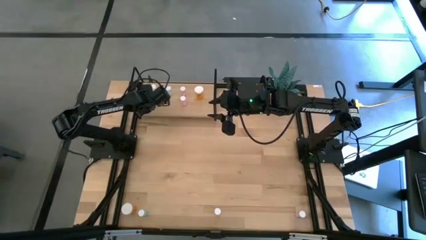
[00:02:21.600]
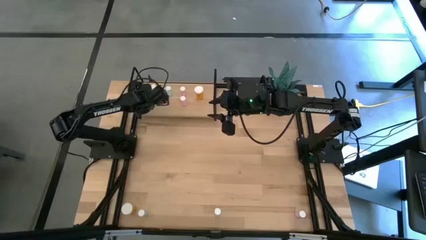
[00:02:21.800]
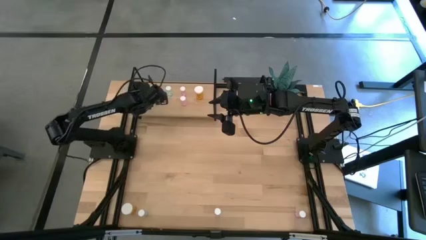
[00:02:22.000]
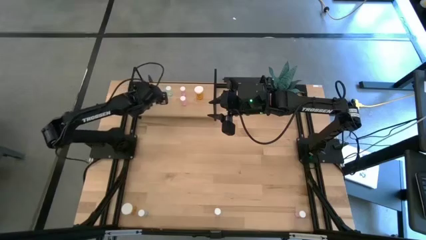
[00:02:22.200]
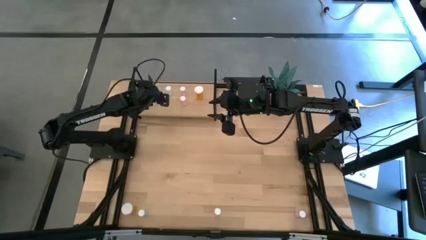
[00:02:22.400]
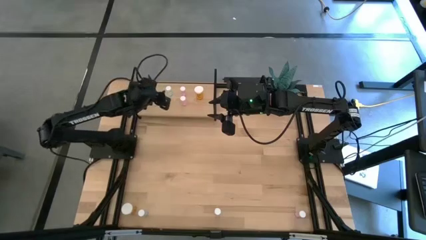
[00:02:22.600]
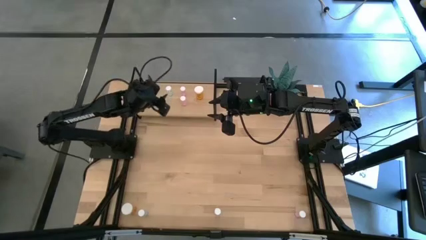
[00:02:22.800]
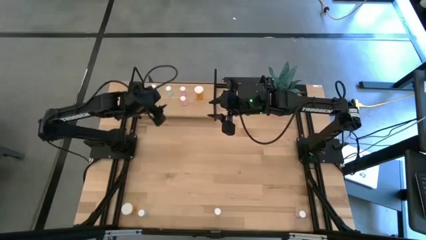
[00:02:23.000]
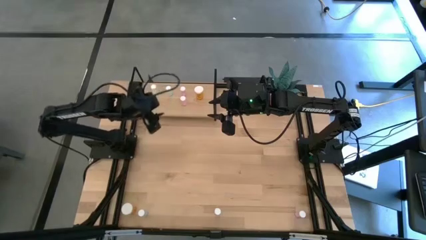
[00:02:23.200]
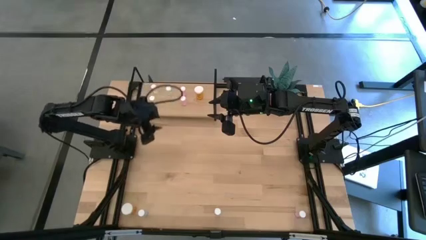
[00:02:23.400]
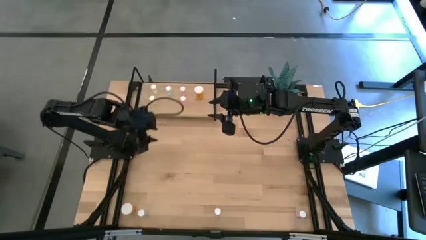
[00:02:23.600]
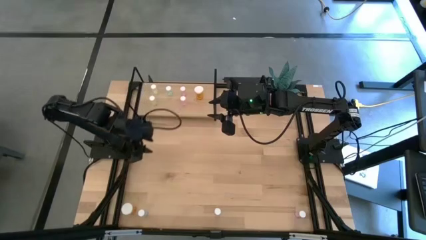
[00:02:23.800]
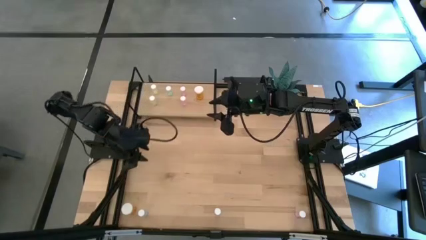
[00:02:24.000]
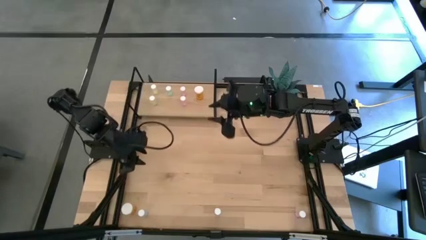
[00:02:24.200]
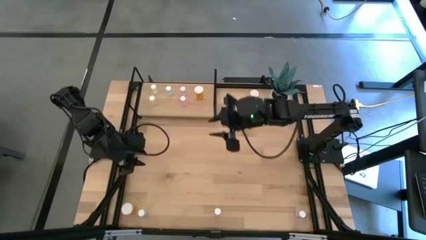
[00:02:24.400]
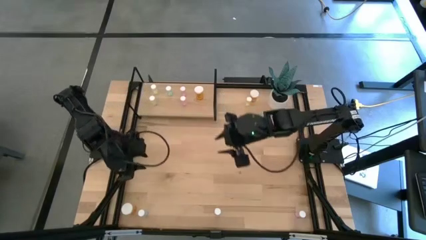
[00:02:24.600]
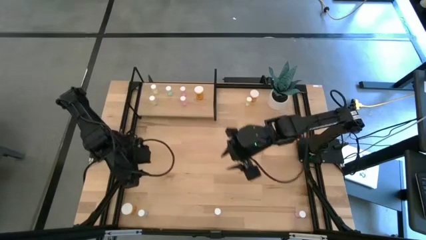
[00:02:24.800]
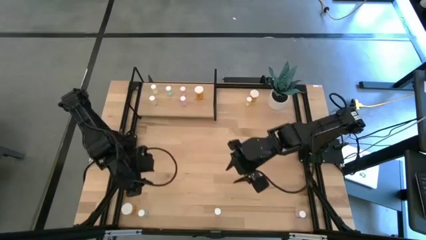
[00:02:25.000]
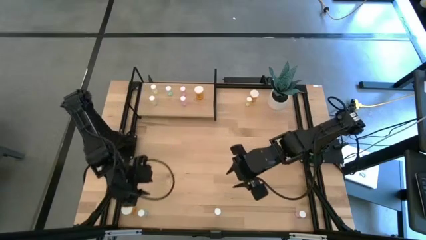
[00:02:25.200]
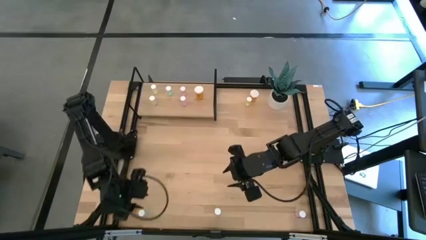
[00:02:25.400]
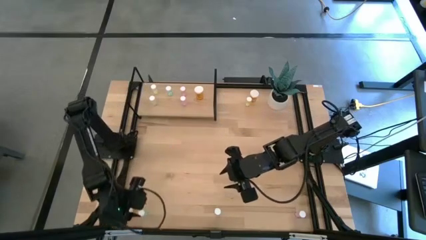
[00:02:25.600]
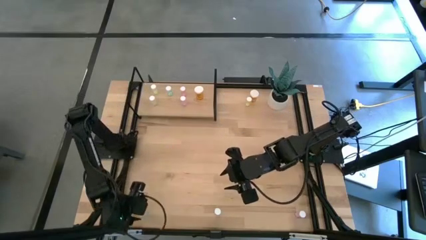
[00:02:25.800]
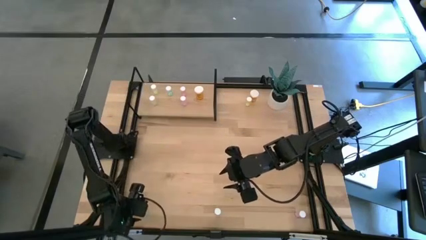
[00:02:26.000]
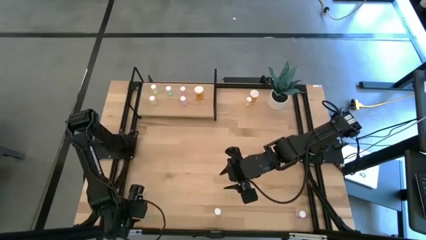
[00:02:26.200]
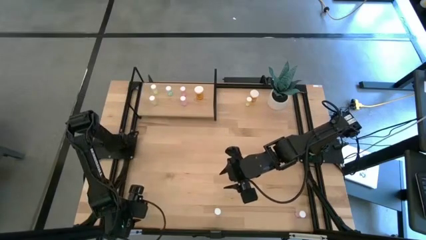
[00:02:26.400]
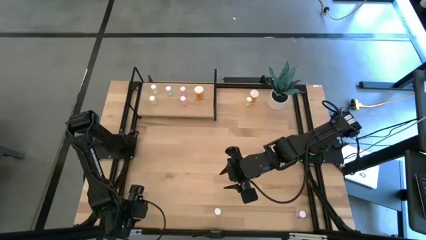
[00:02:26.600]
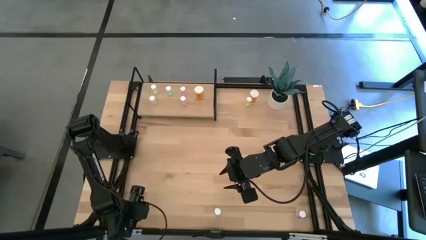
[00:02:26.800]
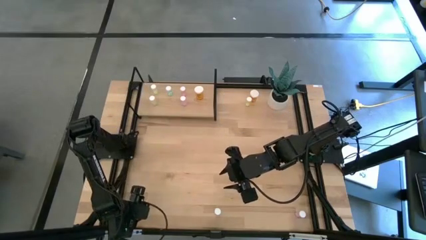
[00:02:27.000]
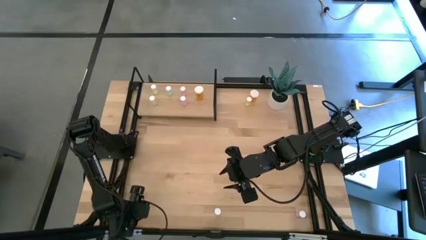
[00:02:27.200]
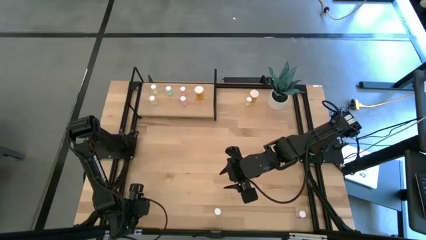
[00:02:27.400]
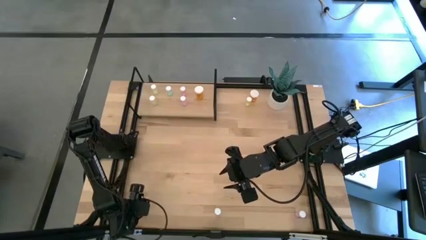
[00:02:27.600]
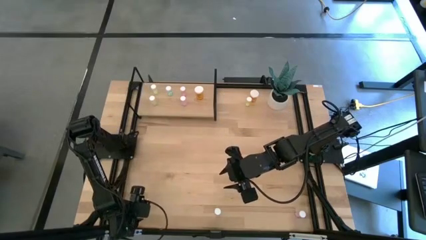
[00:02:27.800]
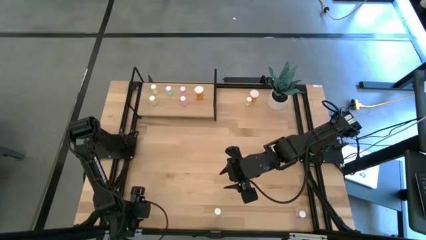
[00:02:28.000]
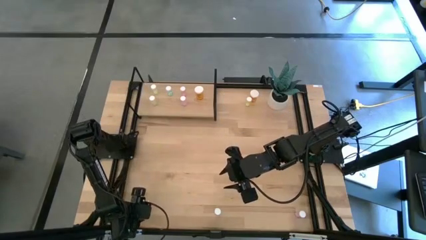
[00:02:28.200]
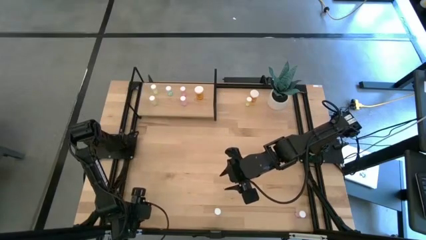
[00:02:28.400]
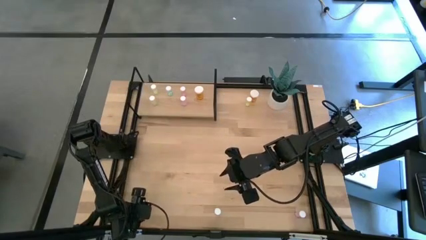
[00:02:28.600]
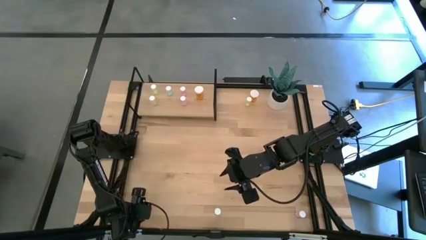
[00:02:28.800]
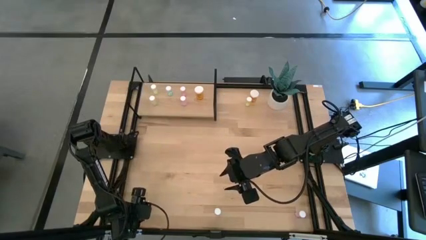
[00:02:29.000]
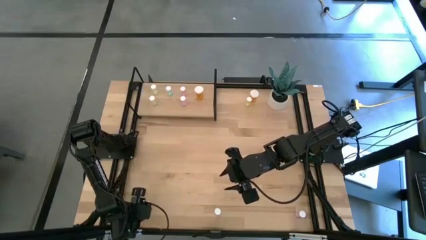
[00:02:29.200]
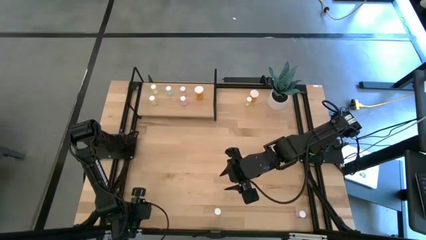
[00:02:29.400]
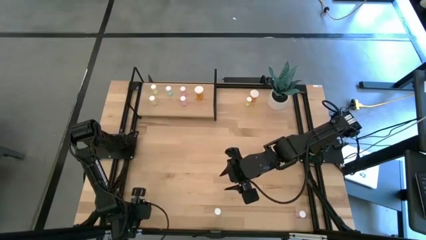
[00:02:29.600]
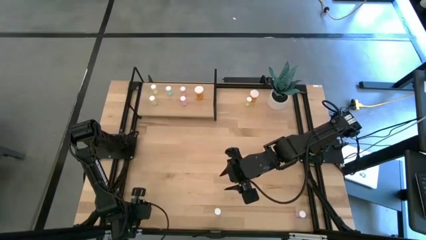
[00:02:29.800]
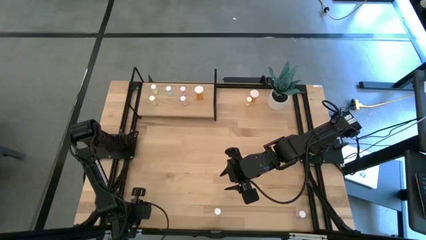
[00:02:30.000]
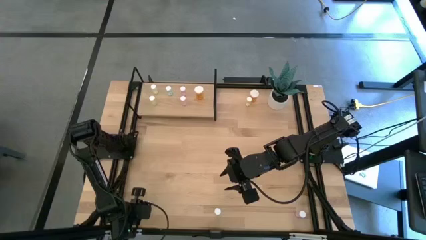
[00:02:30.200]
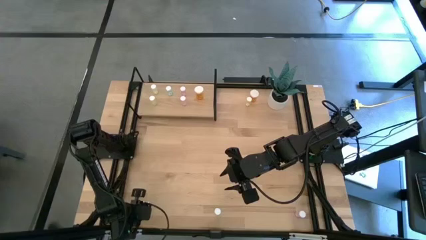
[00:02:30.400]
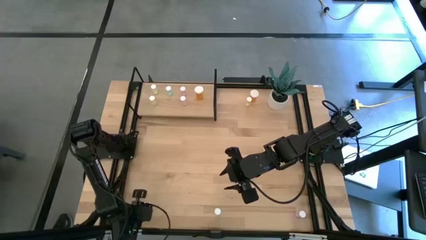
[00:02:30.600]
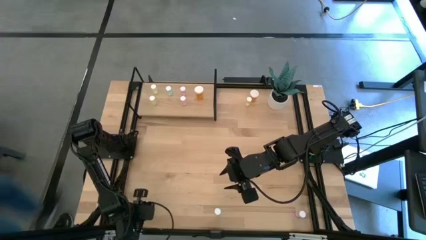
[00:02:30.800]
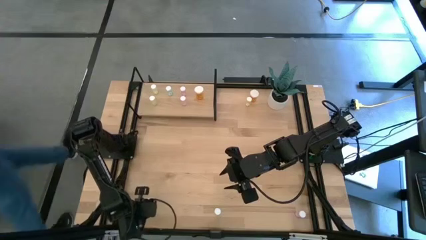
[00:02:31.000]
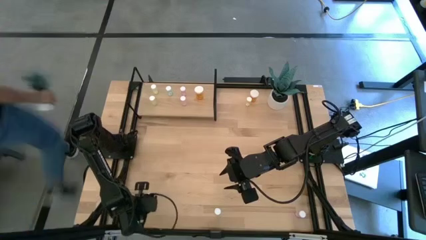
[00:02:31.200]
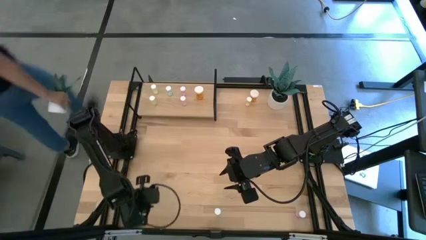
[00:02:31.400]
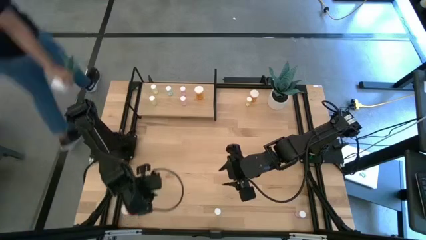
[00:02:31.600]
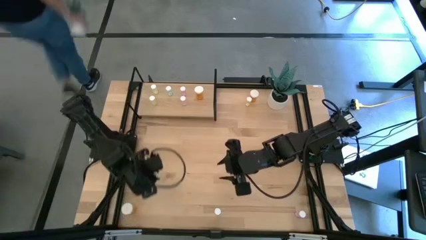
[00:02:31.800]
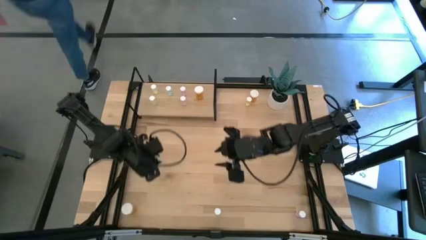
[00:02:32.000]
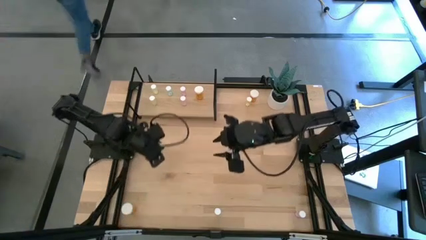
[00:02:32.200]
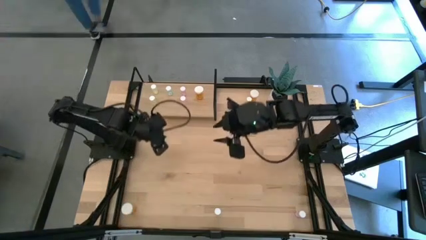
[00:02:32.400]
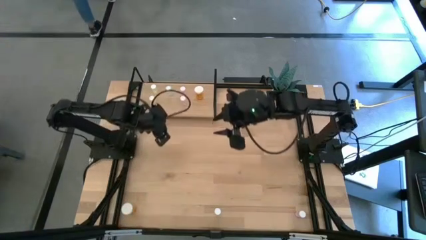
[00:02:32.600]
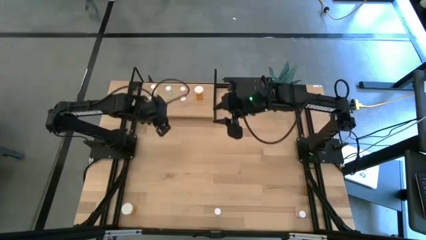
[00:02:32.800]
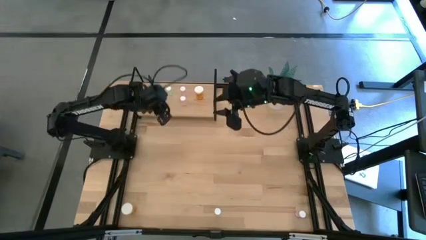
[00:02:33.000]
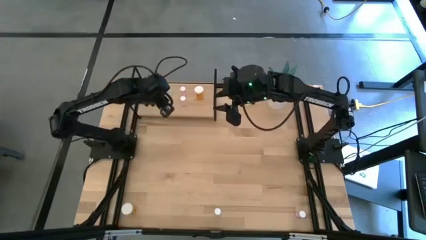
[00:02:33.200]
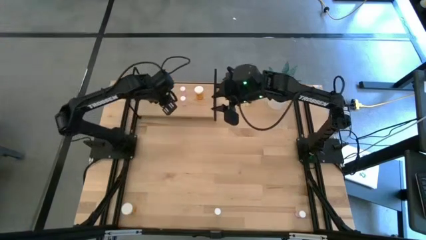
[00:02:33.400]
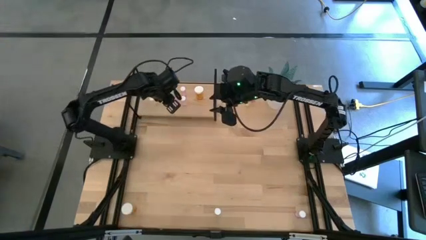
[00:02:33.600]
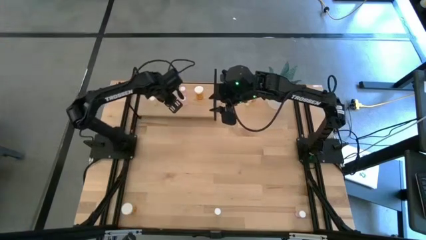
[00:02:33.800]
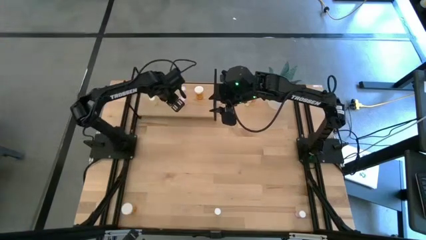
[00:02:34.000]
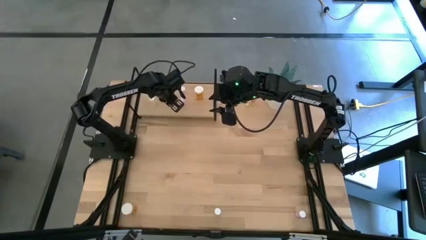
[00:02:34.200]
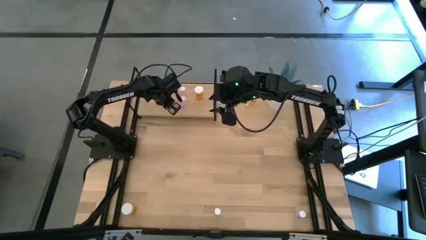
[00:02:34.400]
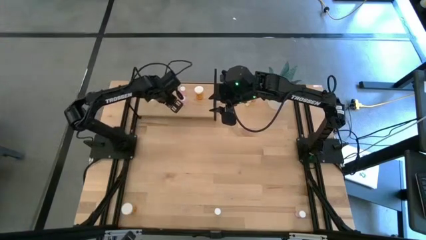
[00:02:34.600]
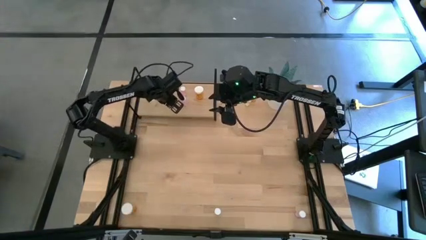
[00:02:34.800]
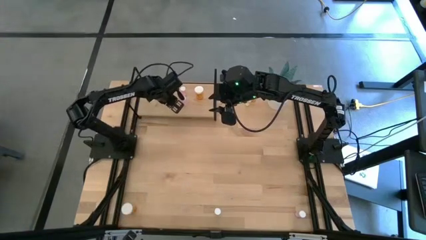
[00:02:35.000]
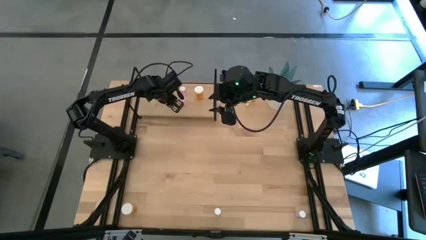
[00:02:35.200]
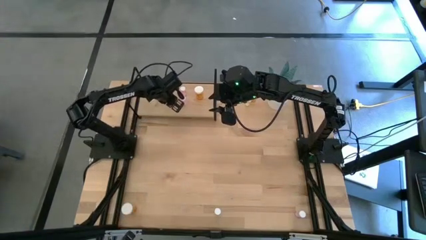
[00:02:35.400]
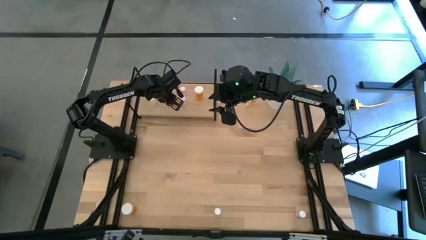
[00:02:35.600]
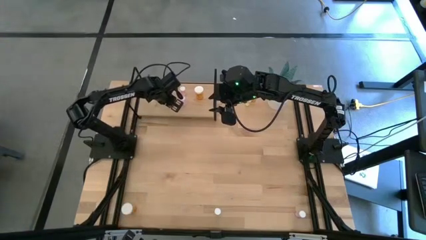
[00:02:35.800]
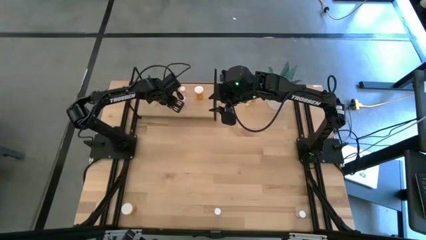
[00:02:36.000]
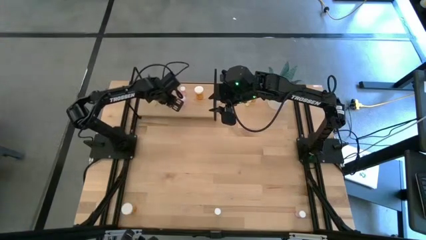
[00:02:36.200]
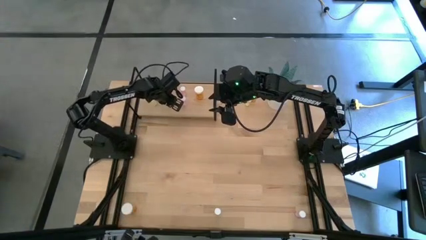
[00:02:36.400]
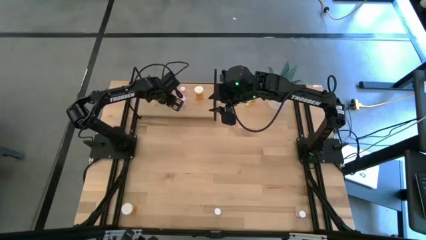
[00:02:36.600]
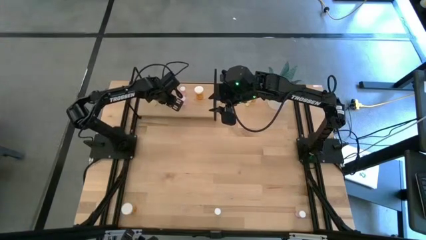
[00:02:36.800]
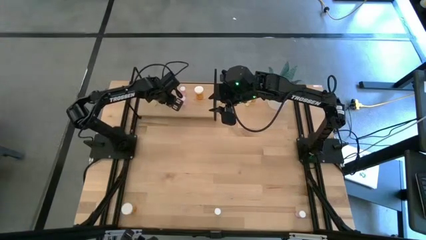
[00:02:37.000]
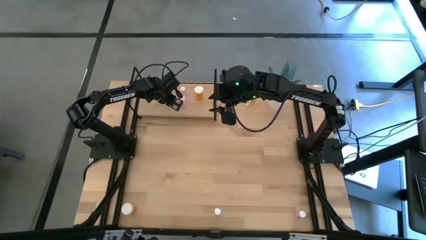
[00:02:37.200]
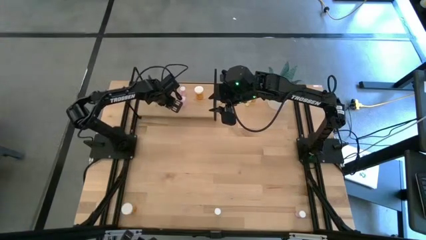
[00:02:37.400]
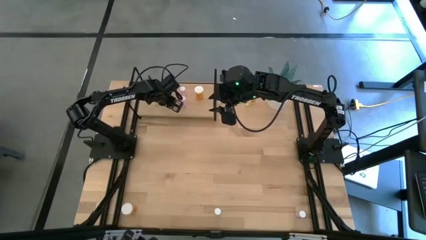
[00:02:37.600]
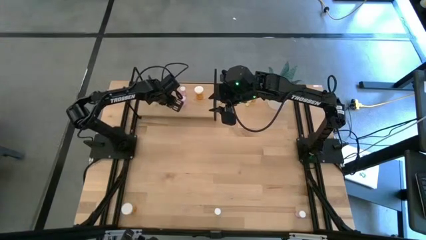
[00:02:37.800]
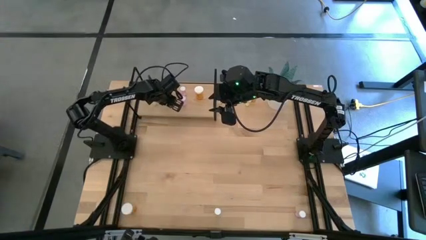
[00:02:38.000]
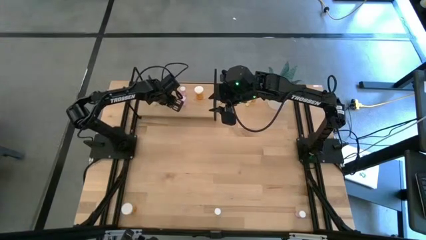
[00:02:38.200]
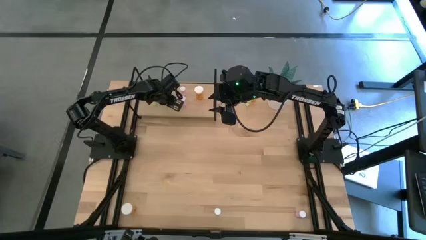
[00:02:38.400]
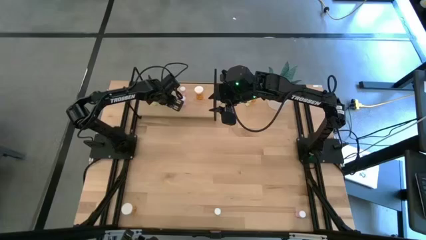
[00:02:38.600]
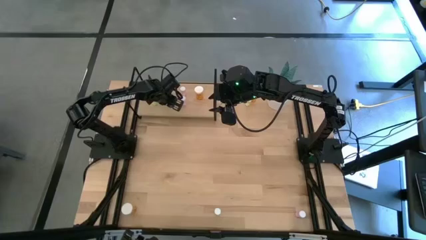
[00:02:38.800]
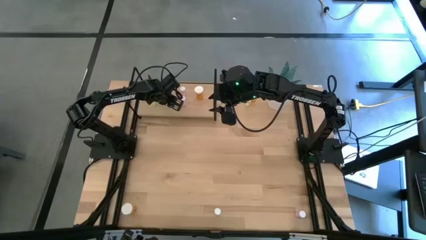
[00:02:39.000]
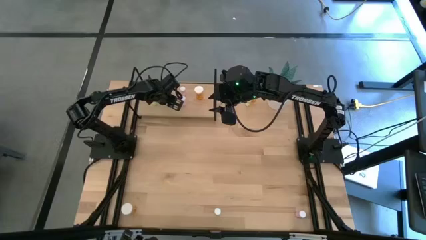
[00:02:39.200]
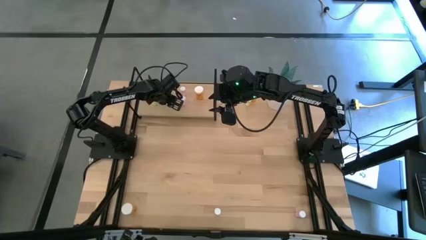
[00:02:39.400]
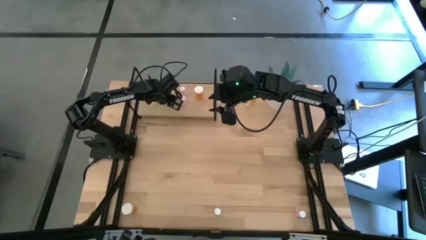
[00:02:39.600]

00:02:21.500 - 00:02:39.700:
Task: Pick and place medicine bottles onto shelf by color
Put the left green pill bottle on the shelf and align it with the other green pill bottle
